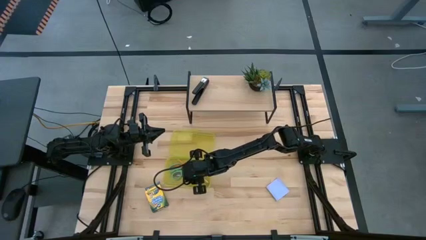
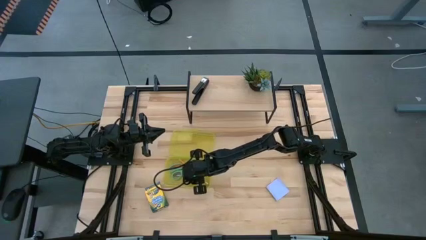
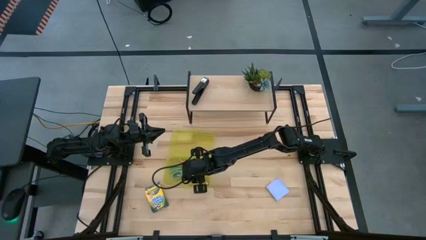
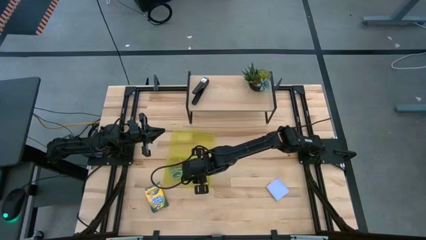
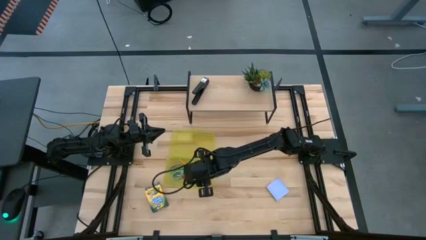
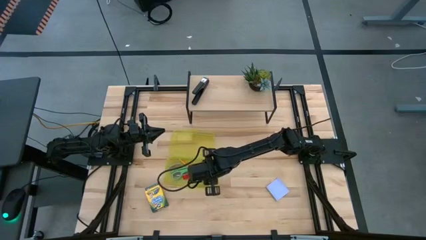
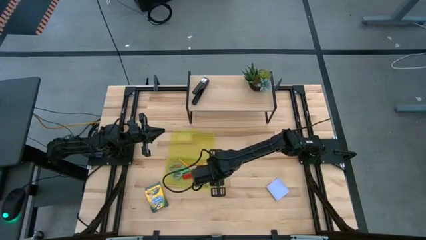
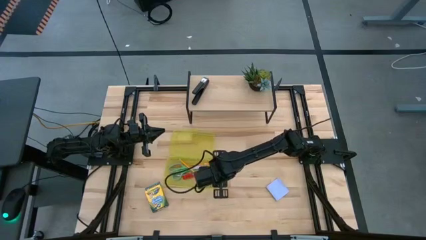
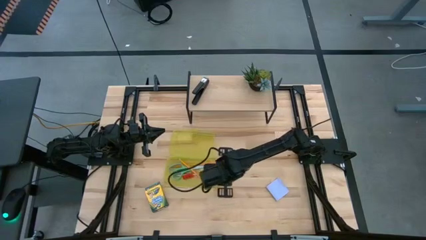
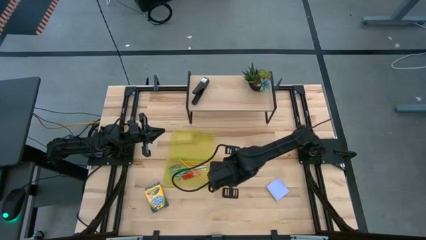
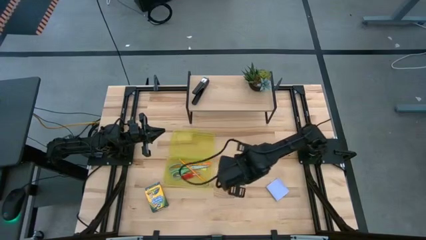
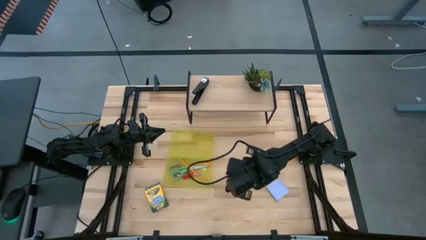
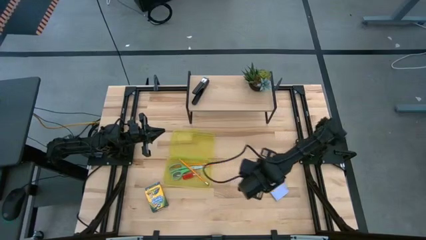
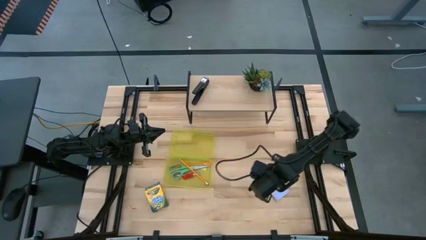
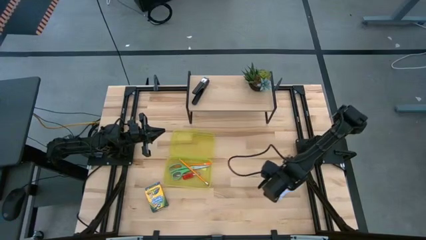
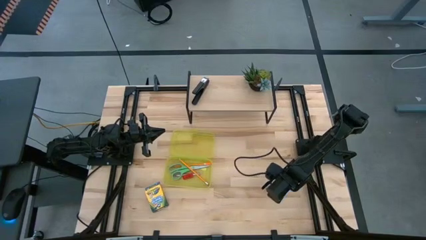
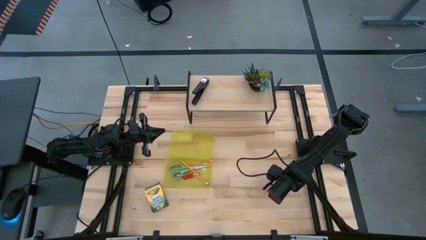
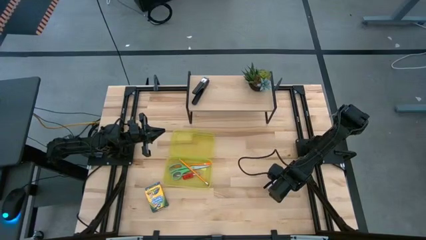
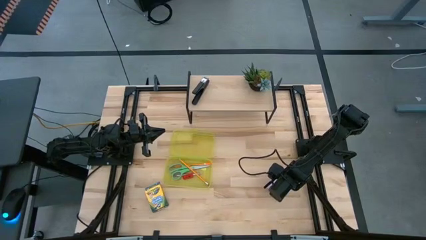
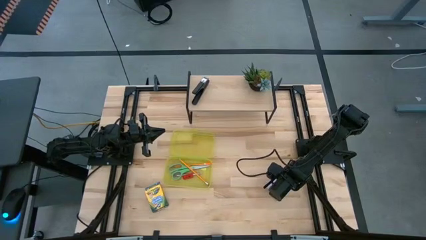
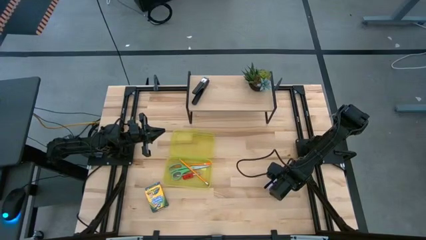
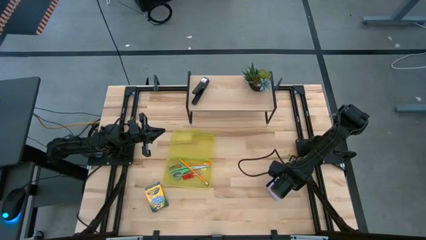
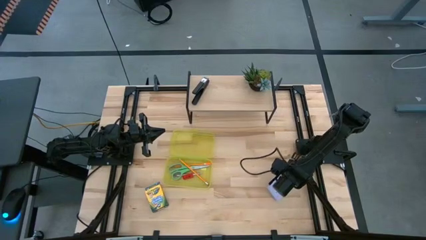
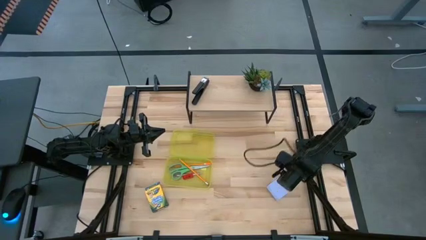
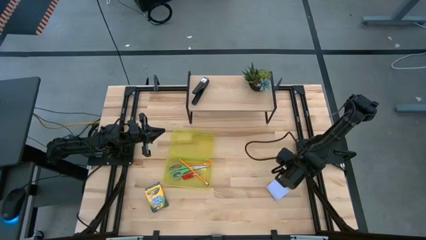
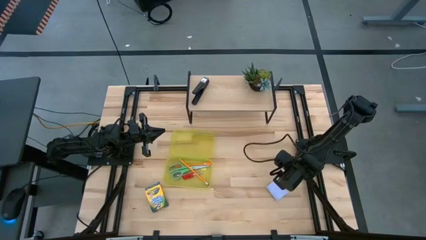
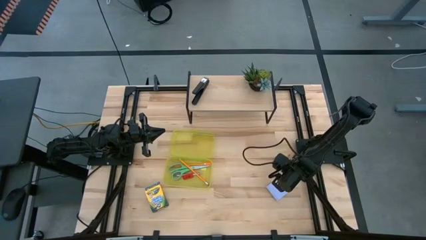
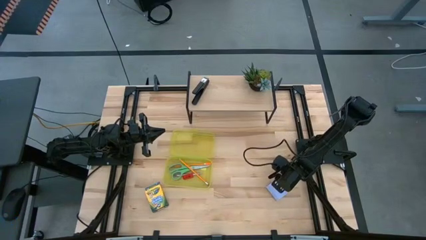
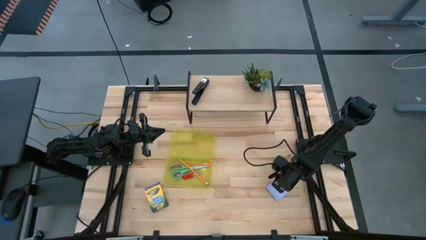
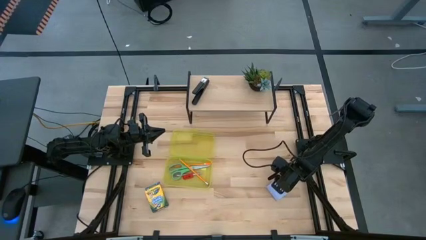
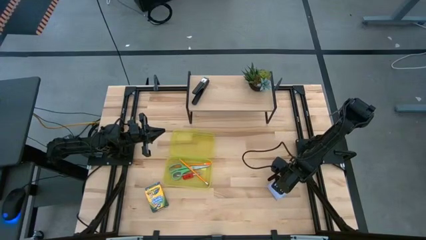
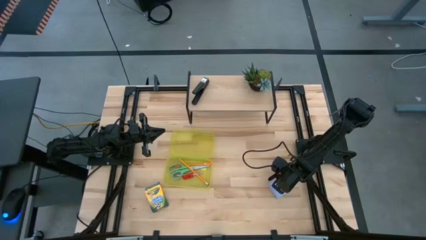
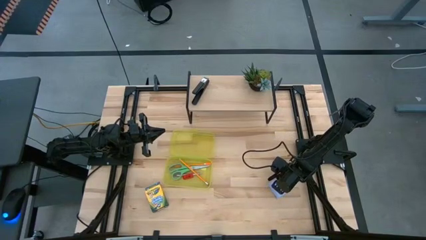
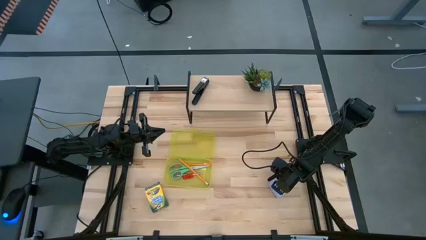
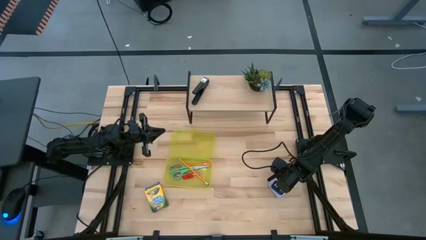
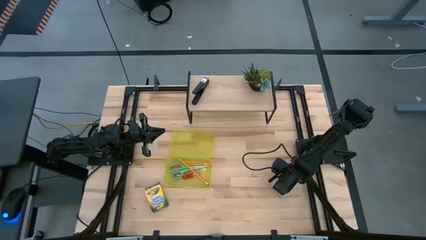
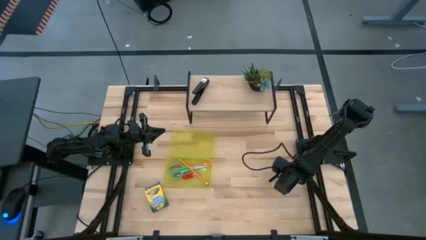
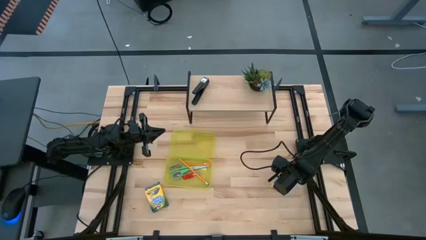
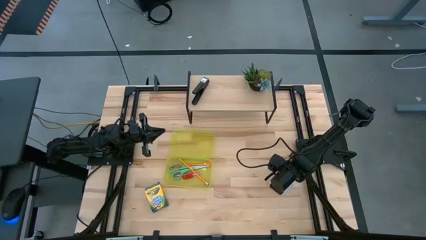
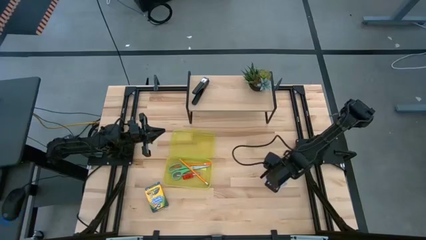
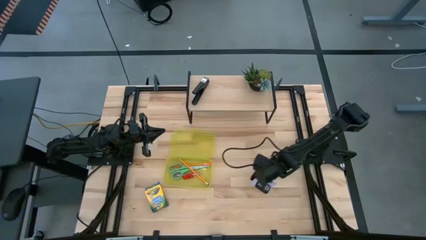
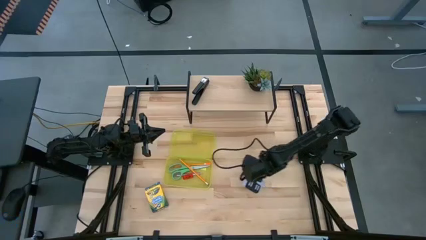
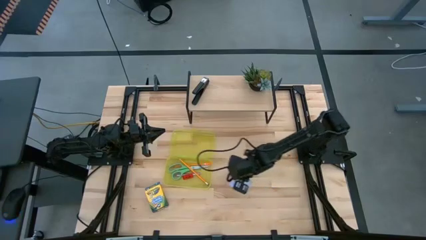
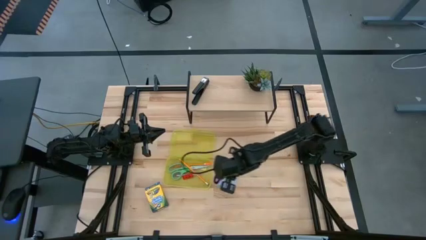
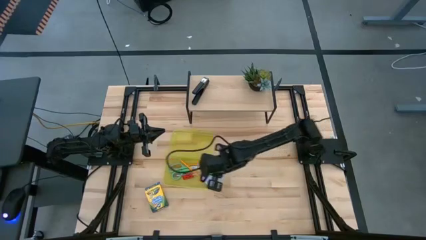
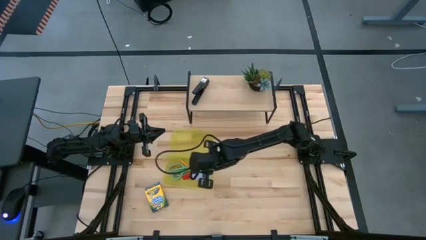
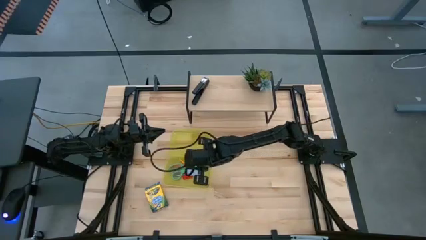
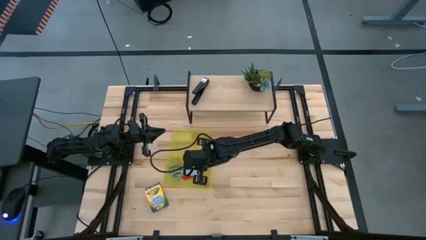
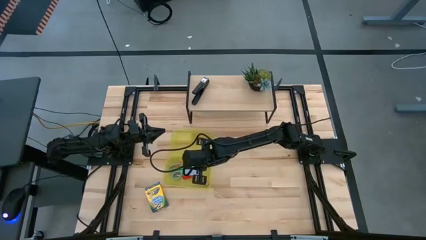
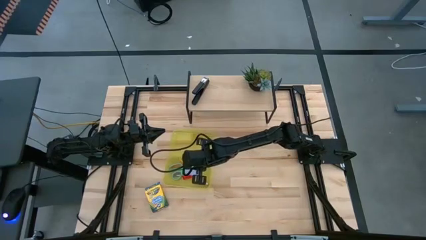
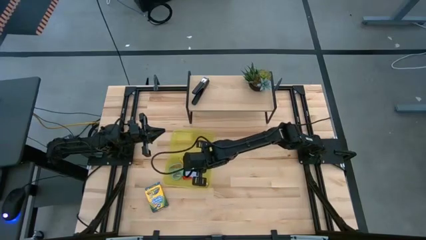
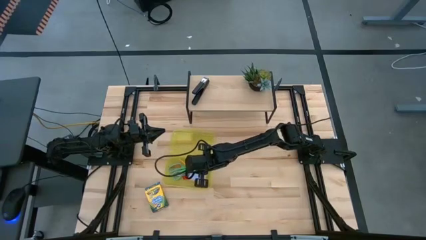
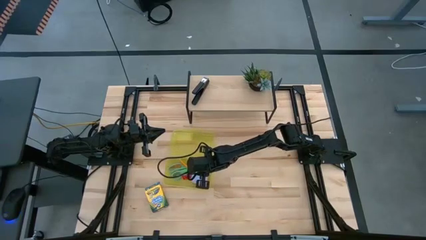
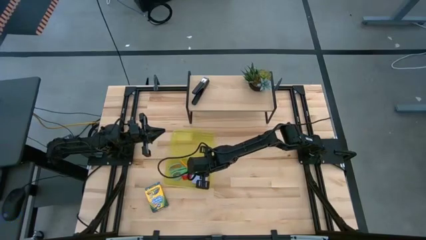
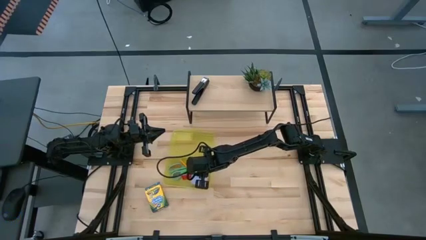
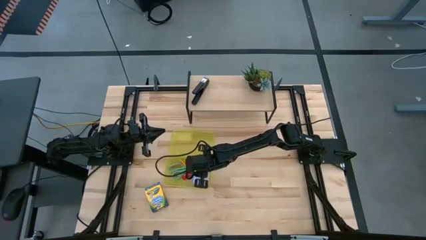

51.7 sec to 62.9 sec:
Task: Pack school essentials
Put the gray sticky notes into the supply box

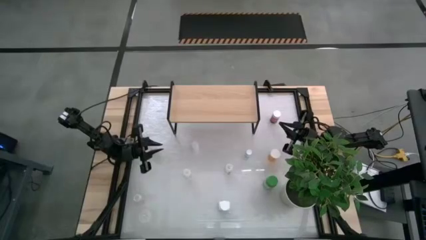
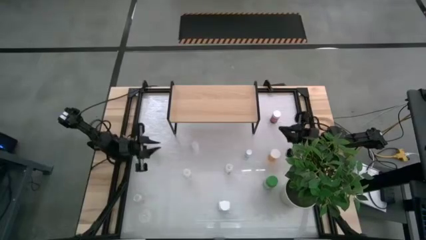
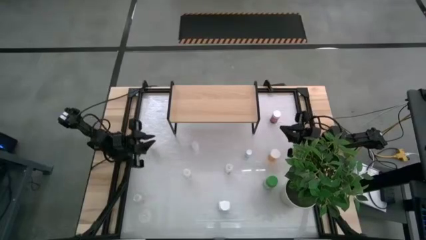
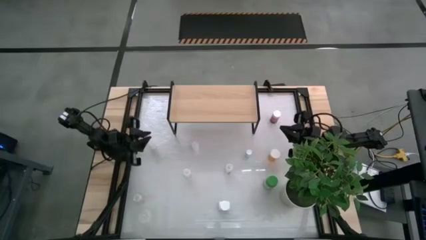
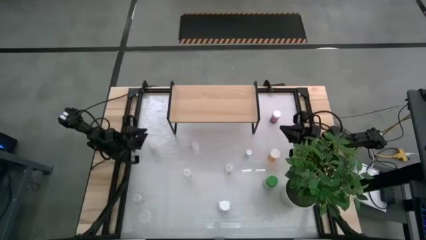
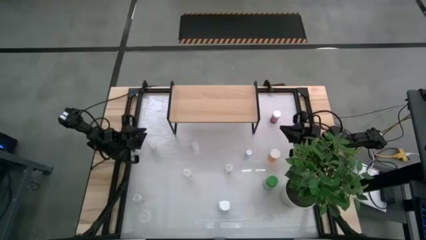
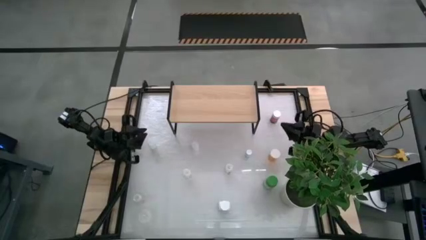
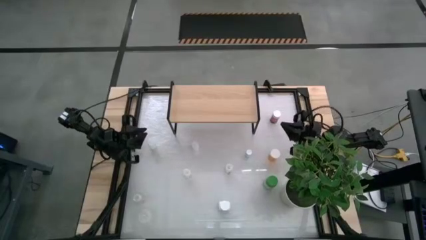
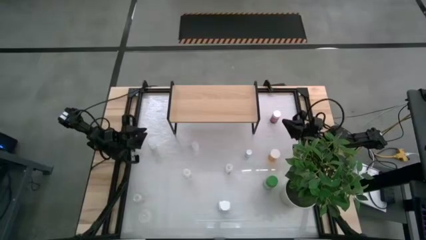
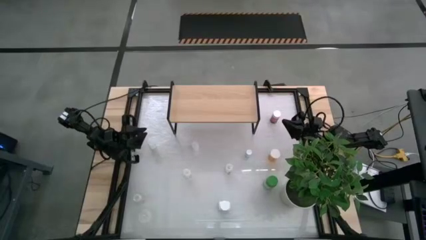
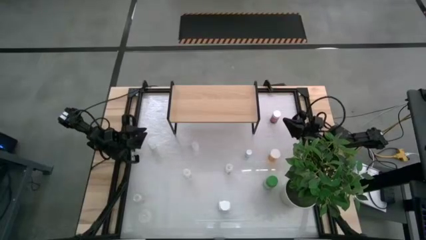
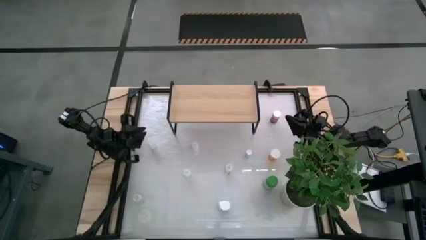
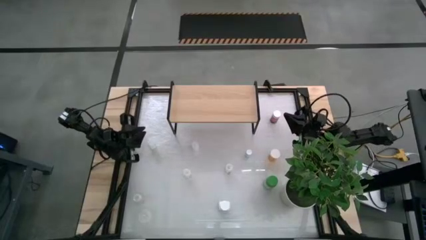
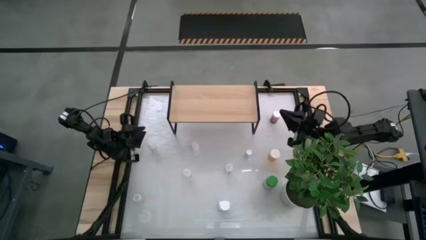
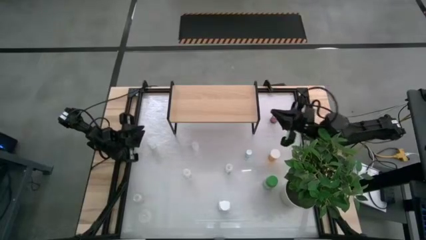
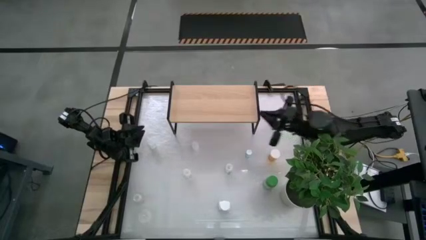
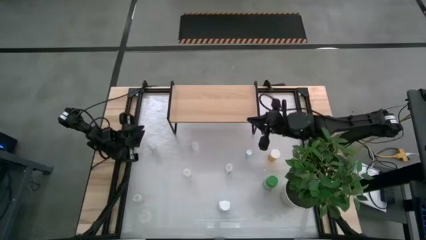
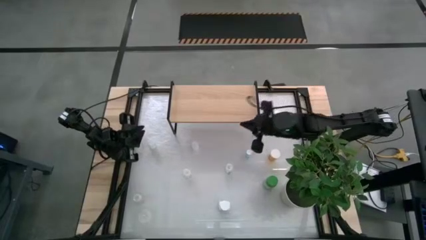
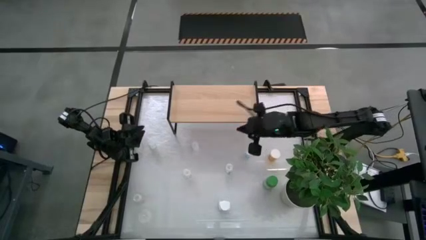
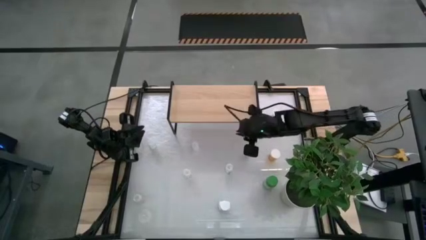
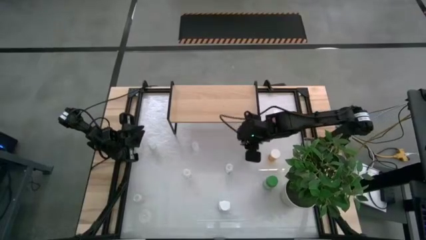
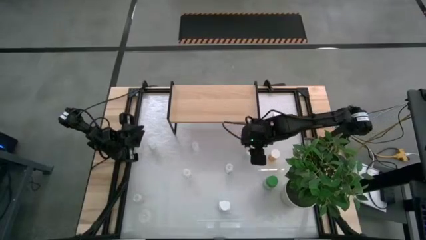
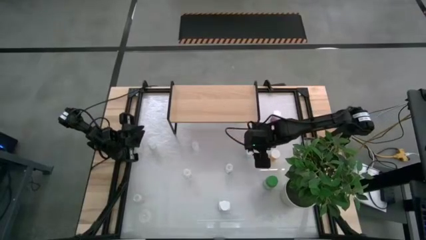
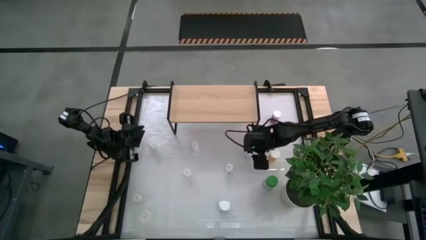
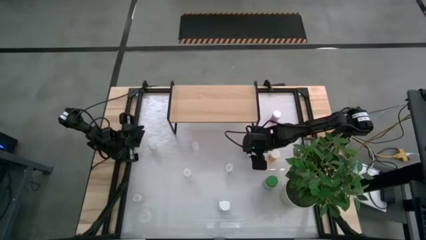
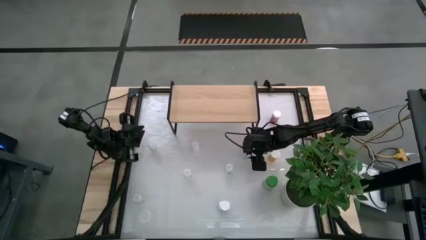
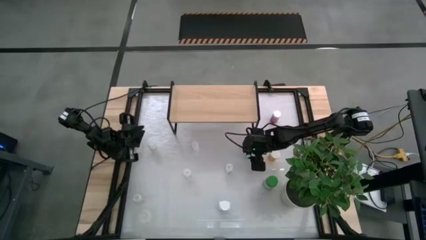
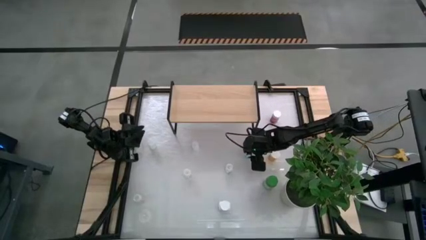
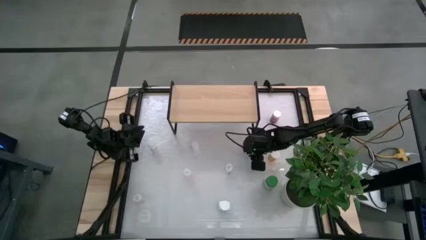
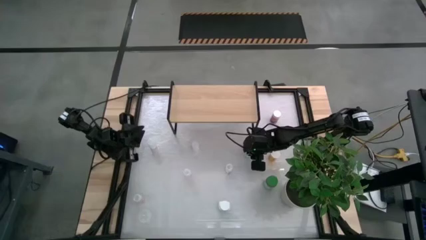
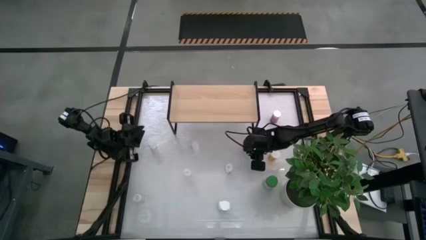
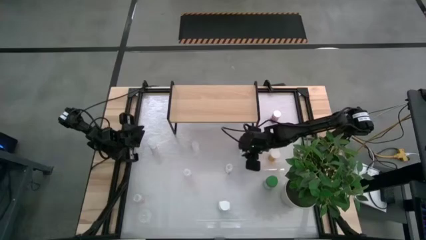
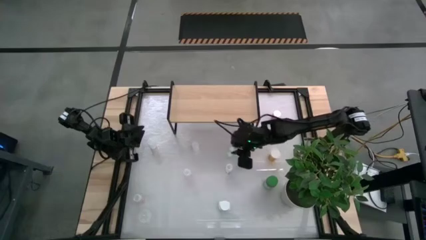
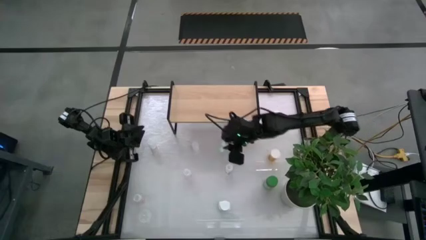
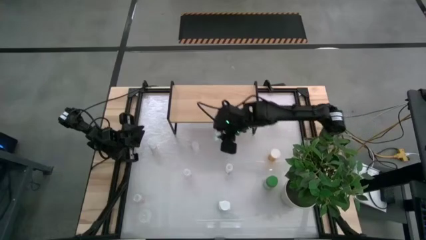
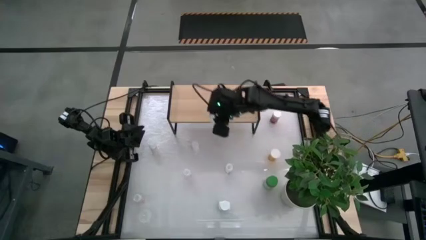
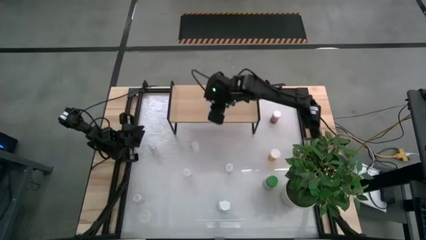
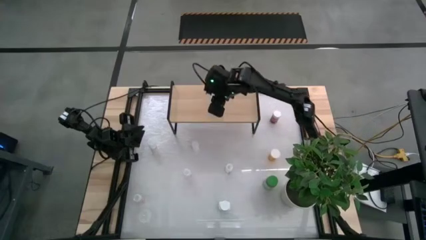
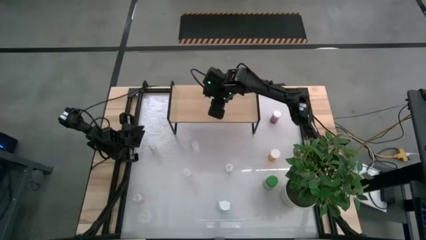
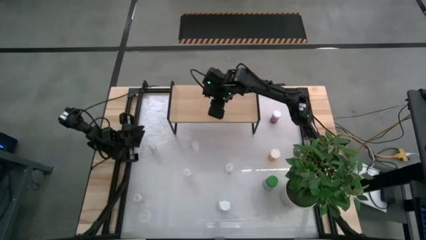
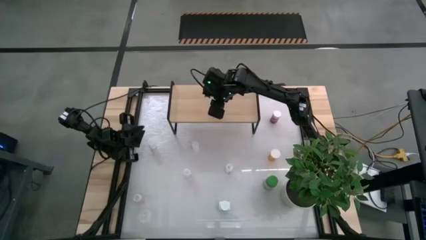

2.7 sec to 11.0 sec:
Task: Pick and place medicine bottles onto shelf by color
Put the light green pill bottle on the shelf
